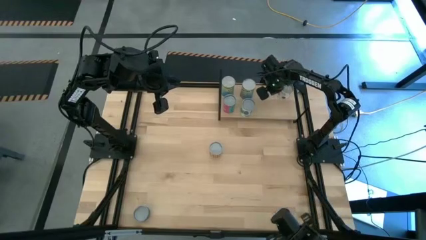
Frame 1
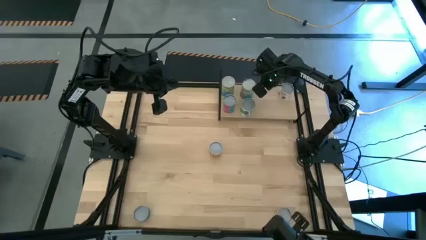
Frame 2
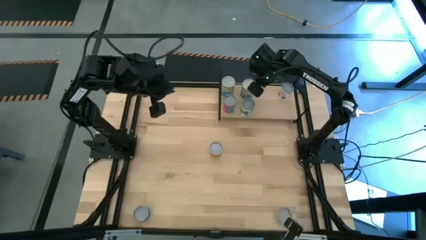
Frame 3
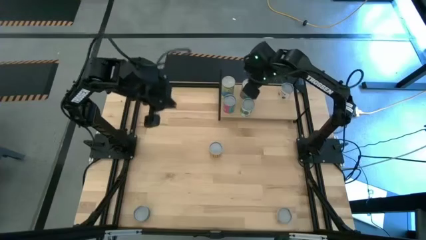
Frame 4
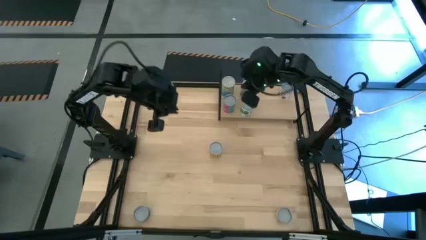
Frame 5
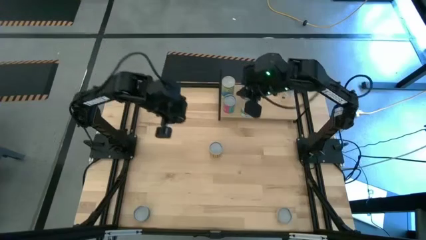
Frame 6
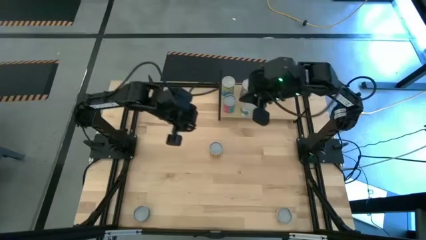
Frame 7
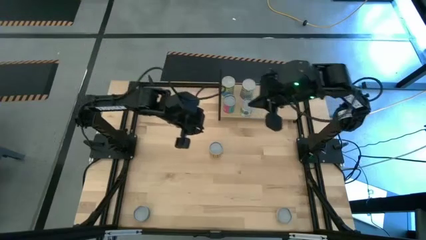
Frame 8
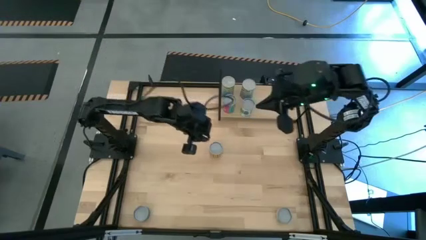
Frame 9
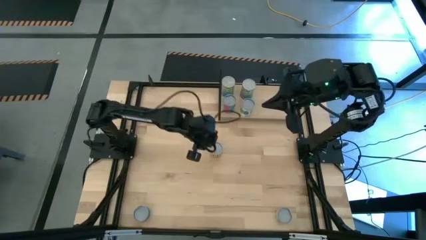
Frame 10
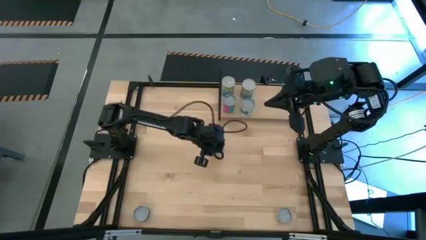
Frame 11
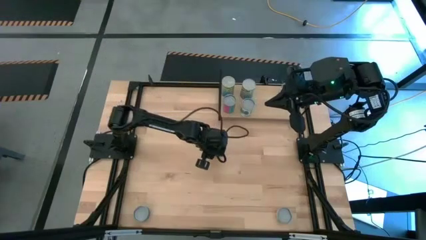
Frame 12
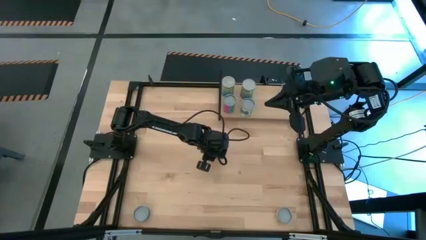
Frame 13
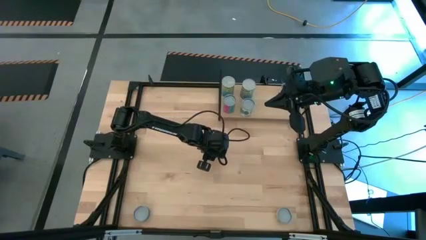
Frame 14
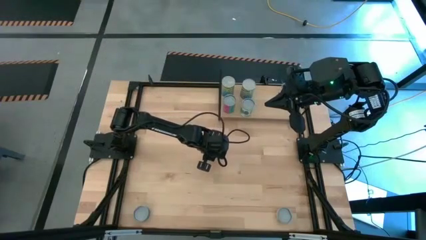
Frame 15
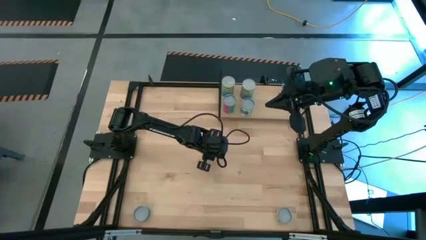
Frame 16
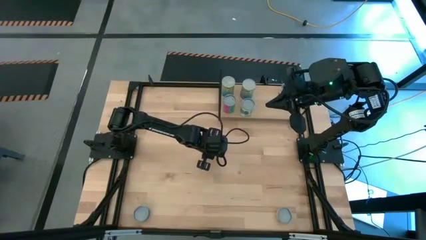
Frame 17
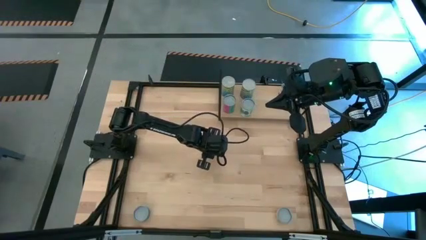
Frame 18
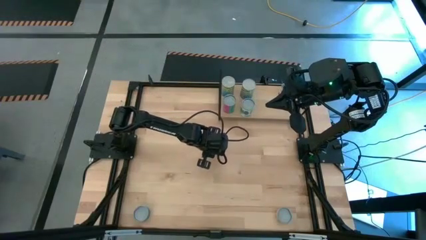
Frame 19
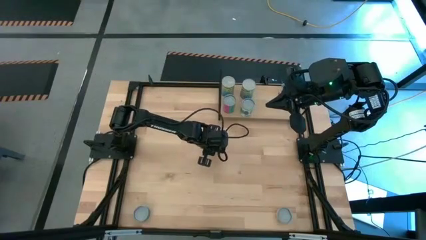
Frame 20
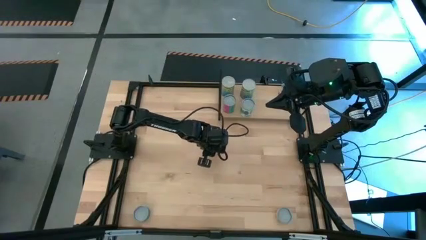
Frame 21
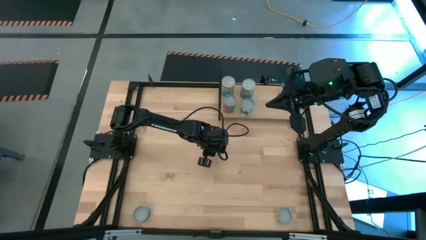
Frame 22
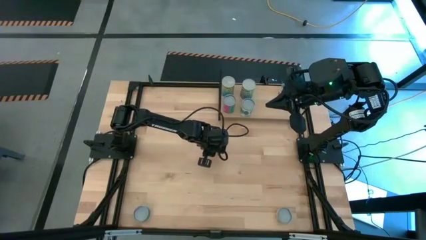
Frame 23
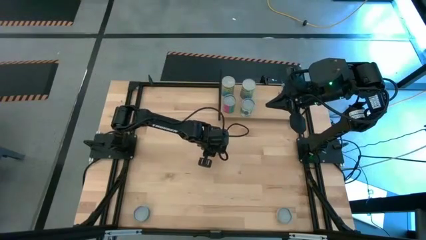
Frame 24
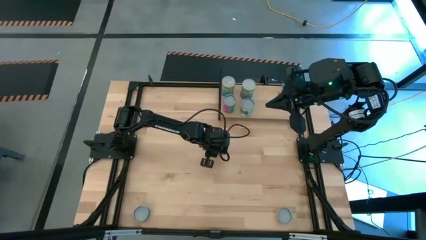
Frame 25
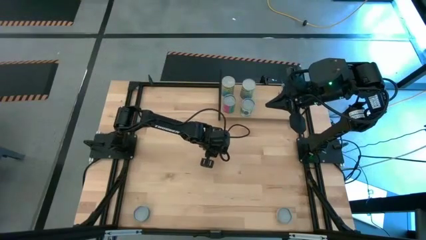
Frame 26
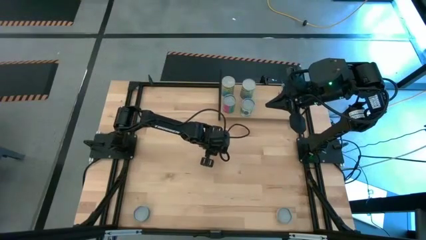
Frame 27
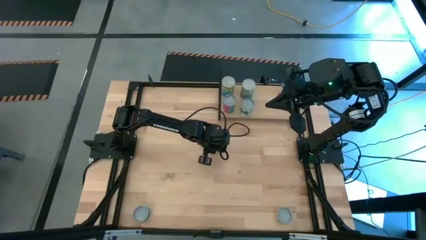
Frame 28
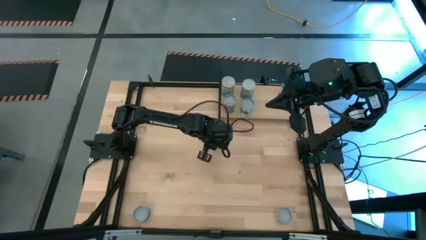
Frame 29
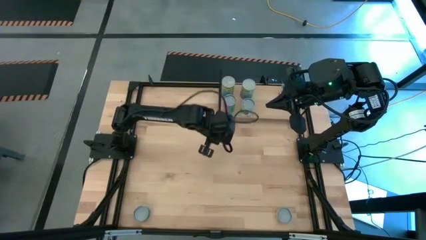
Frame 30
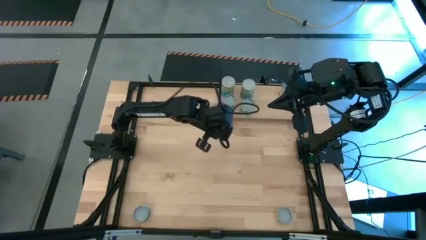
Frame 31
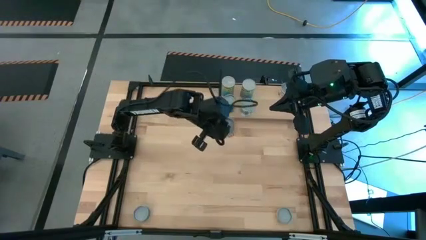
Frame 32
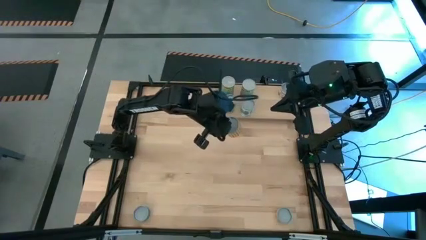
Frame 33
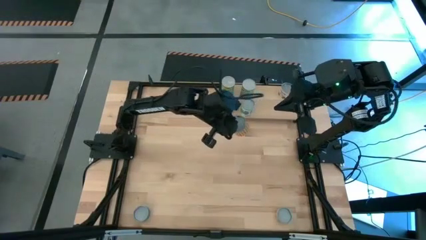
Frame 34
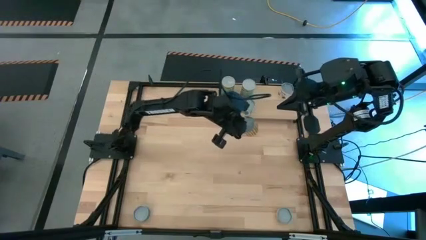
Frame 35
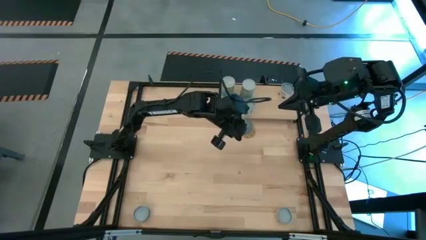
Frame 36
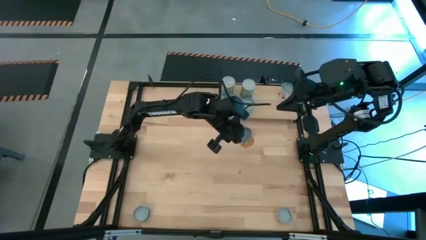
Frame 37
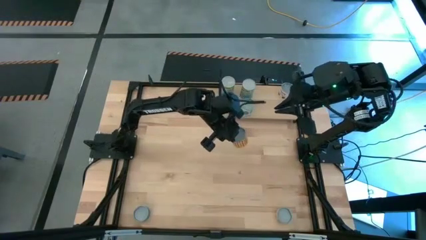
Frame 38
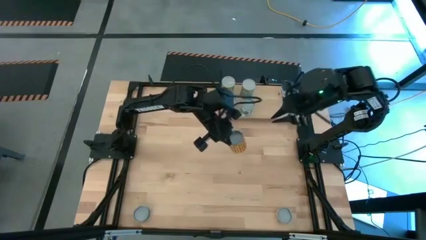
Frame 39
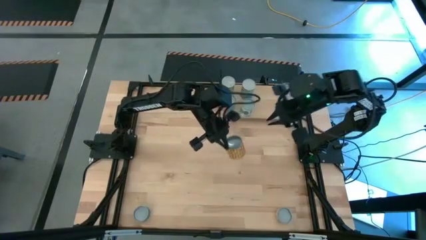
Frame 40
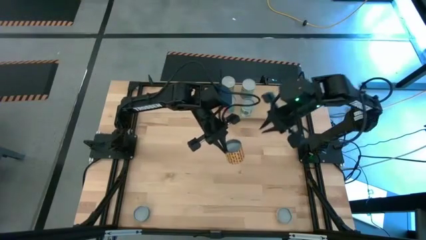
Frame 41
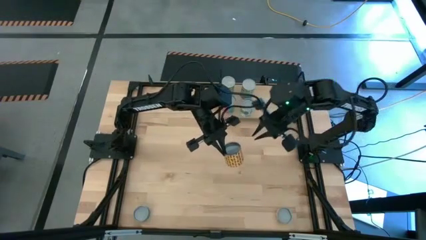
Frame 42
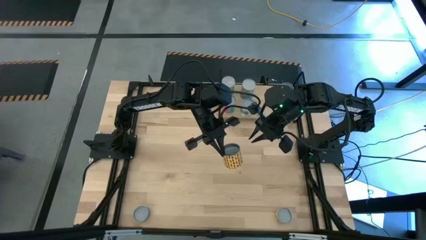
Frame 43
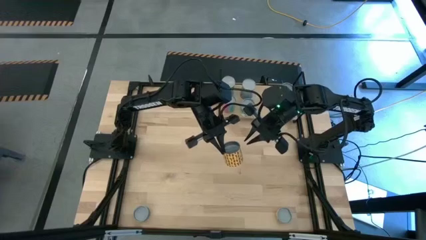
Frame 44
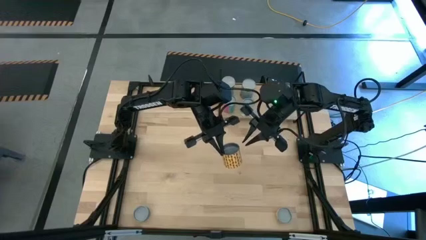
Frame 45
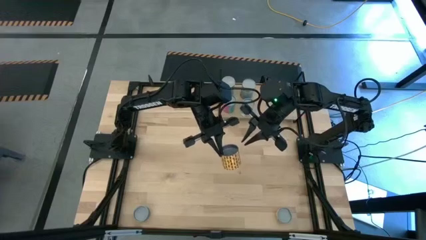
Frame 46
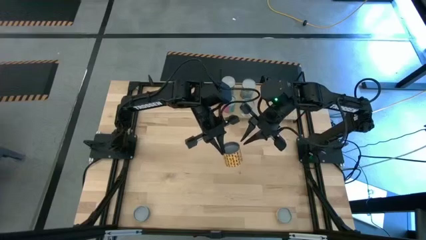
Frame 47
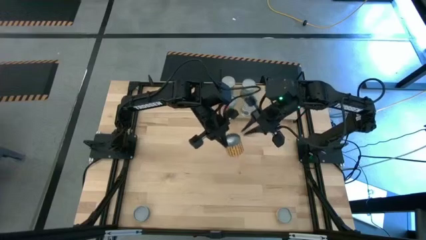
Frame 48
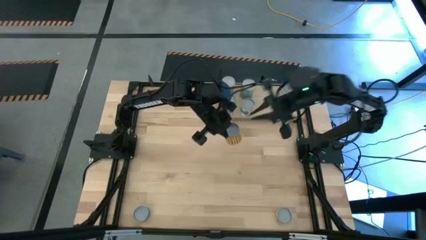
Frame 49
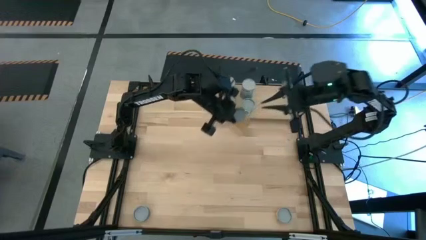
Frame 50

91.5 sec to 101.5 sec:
Task: Pick and place cans onto a shelf
Put the canned chili beans on the shelf

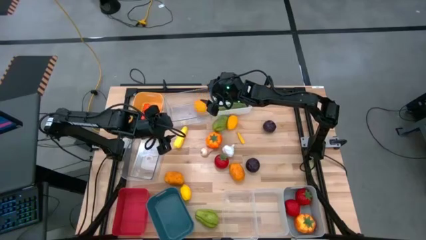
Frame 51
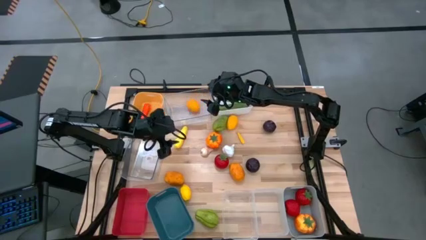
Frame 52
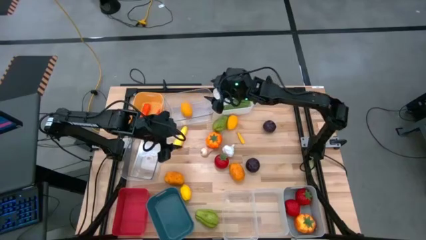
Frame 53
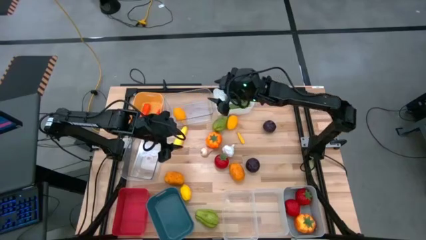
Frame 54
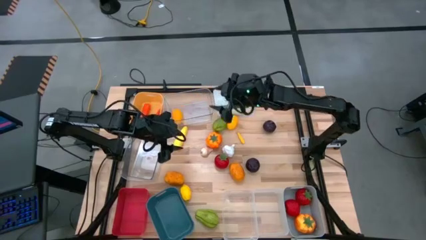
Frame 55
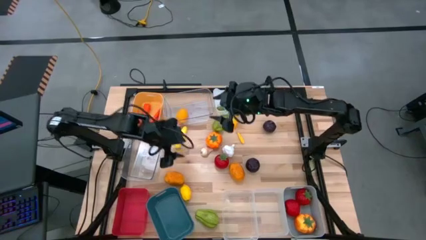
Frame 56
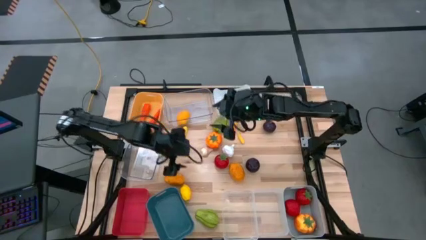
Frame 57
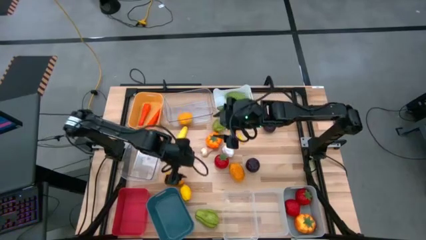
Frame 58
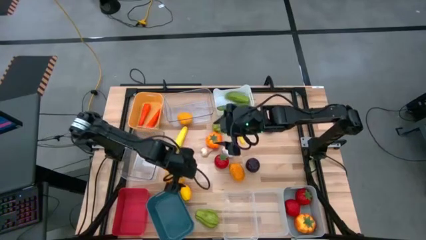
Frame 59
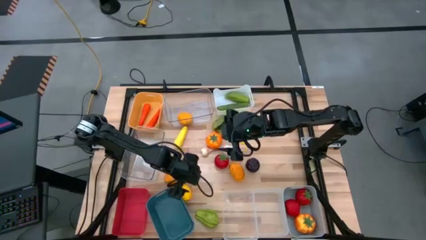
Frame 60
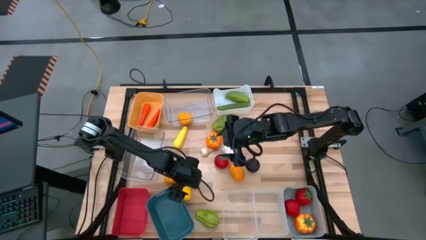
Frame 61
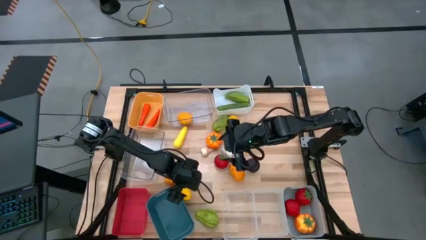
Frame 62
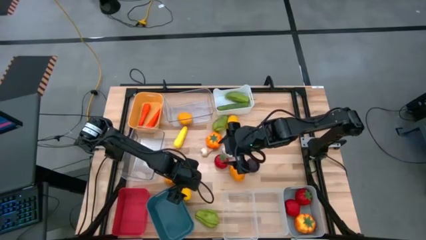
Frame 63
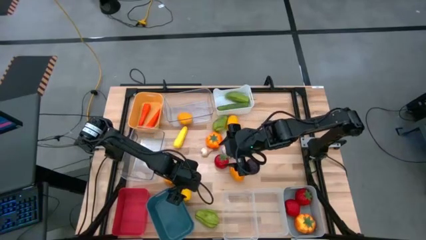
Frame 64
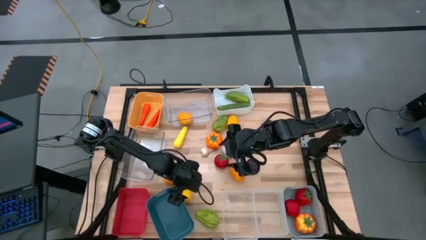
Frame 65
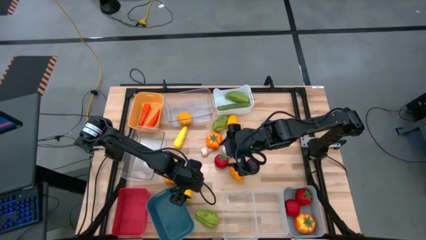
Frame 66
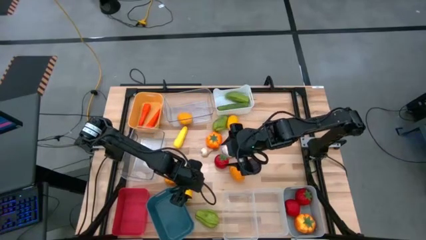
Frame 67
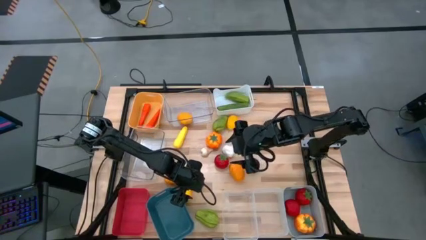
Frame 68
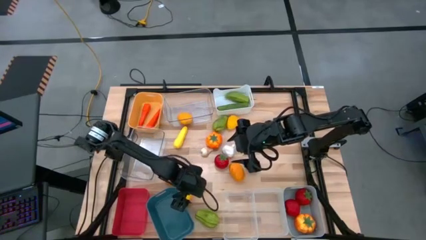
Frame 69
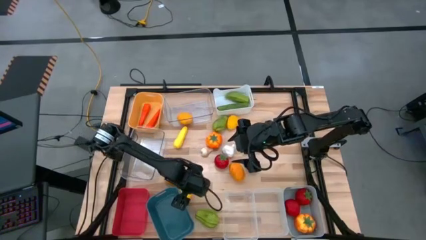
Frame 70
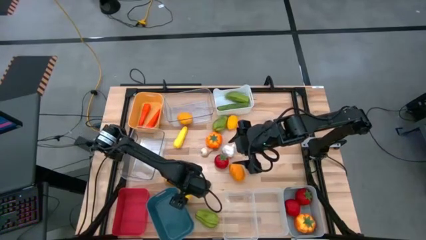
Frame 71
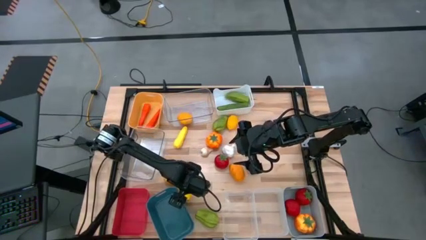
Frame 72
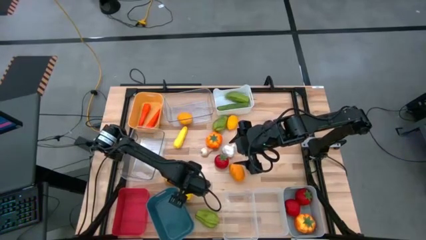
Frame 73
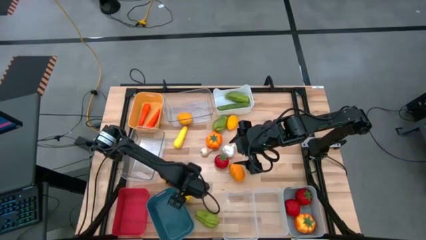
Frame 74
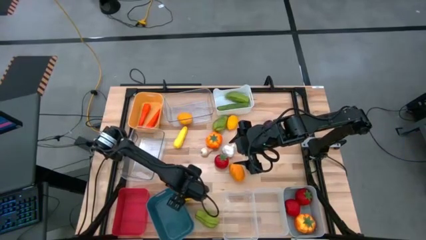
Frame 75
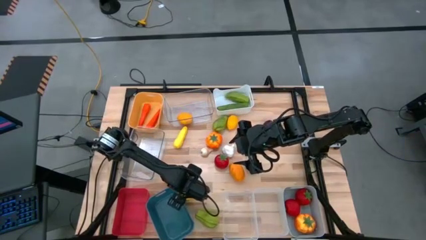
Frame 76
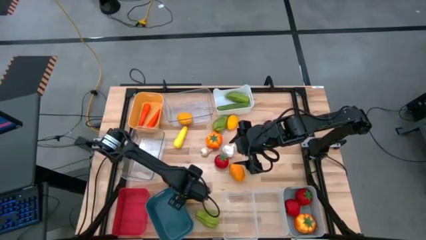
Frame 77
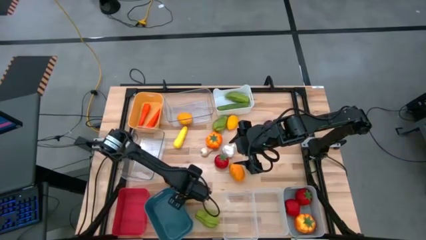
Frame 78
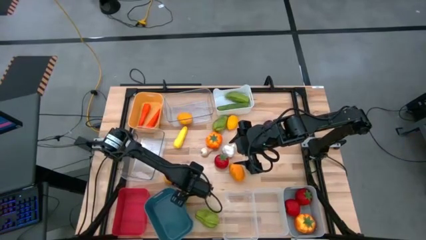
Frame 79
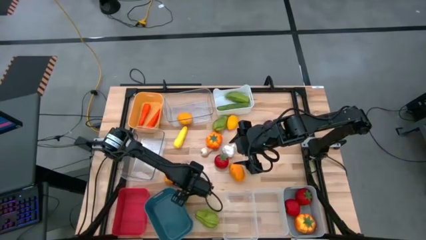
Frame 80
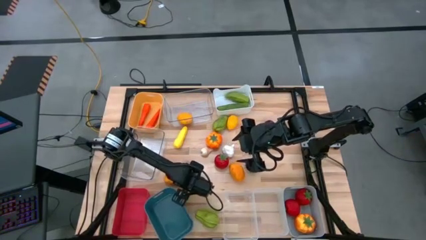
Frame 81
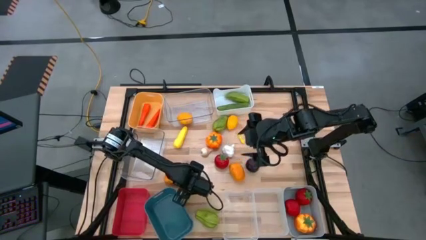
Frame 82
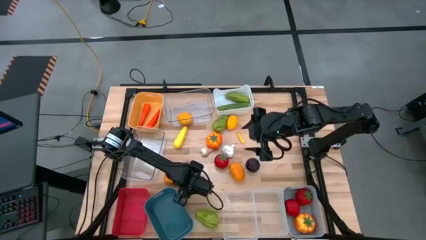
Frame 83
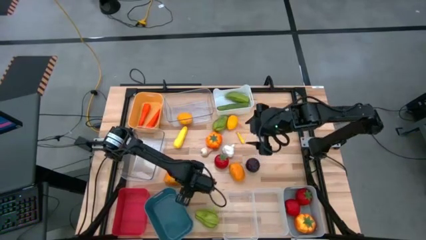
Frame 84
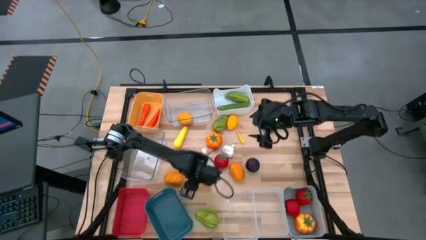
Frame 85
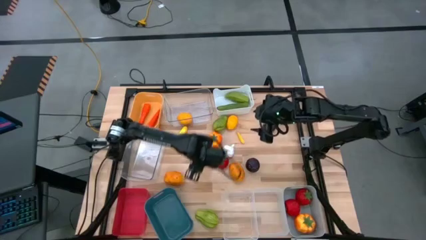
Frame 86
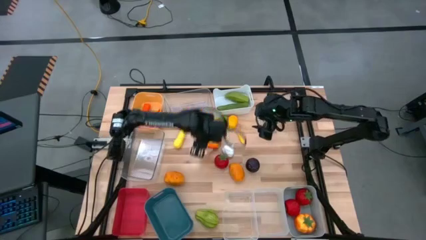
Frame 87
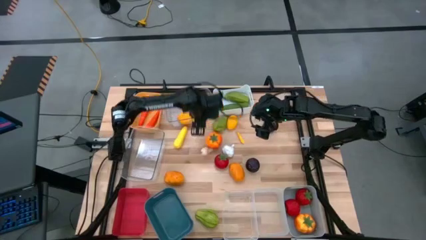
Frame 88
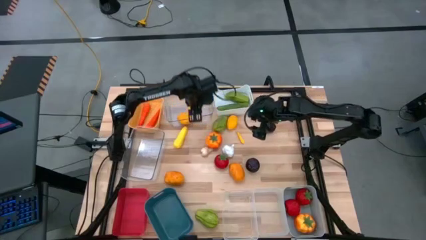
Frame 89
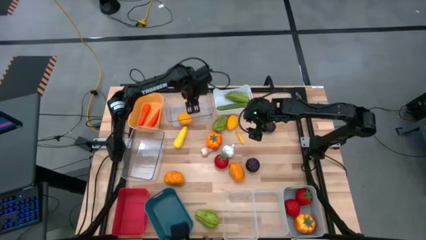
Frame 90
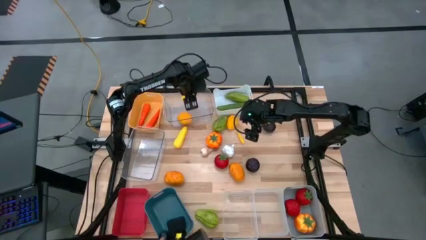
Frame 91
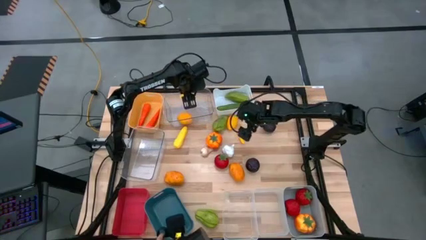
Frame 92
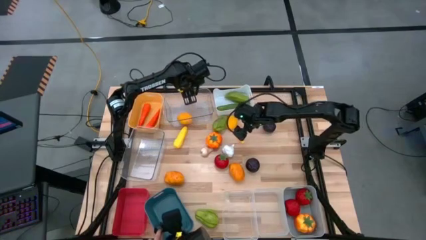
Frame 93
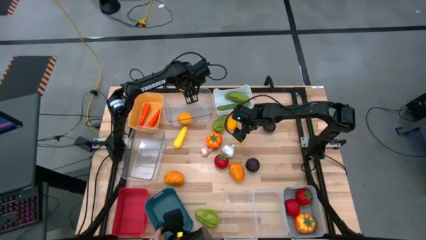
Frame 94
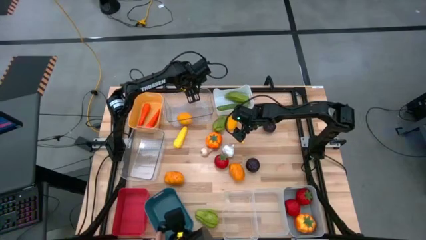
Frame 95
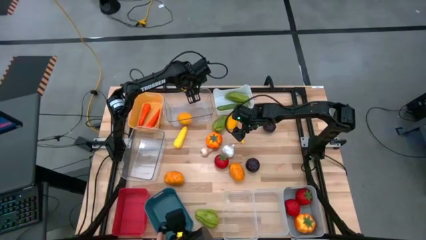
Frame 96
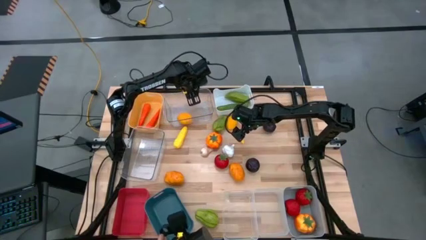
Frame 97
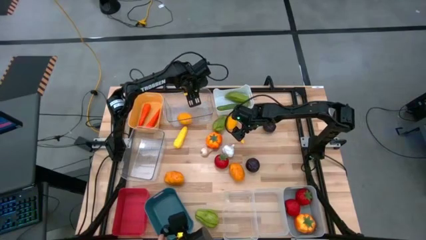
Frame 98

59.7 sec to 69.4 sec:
Task: Sort produce into baskets
Put the bottom yellow lemon into the top transparent bin
